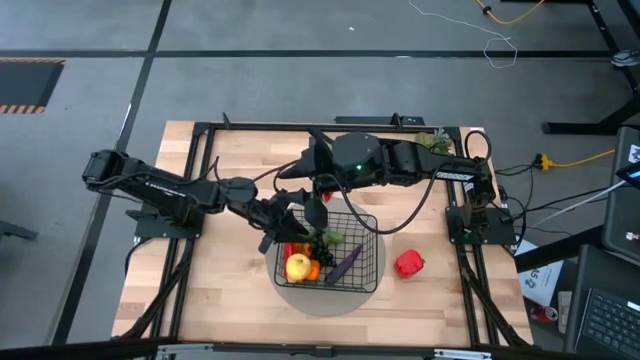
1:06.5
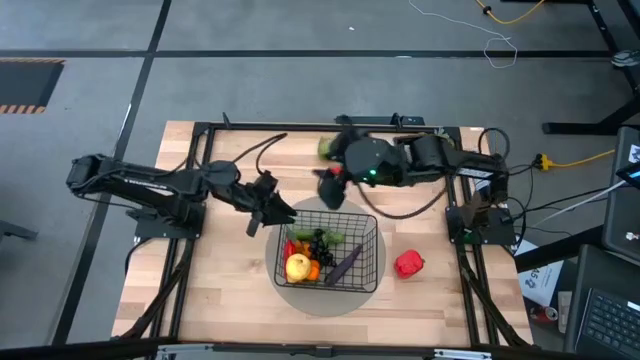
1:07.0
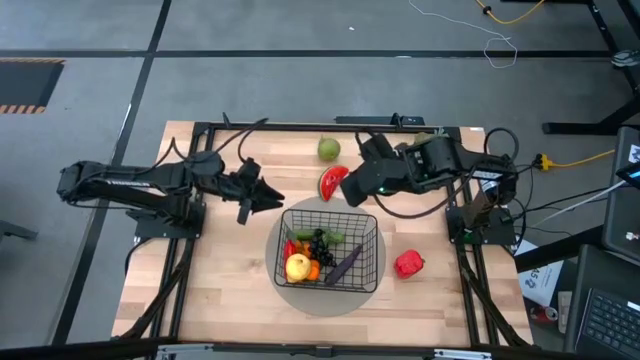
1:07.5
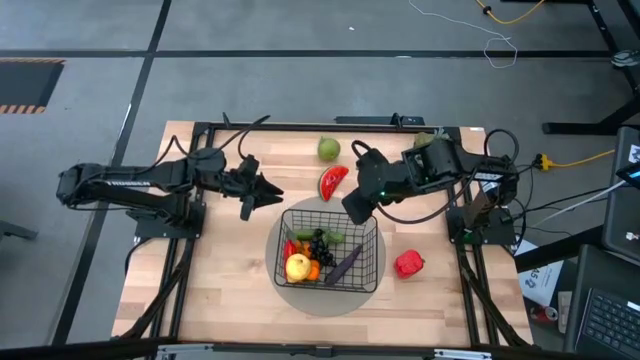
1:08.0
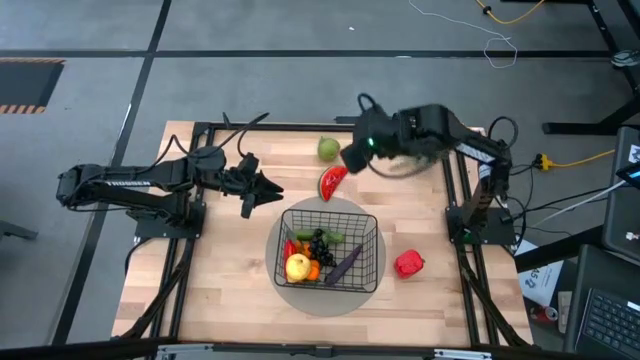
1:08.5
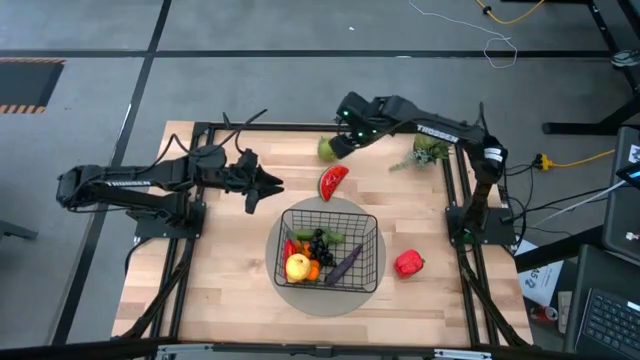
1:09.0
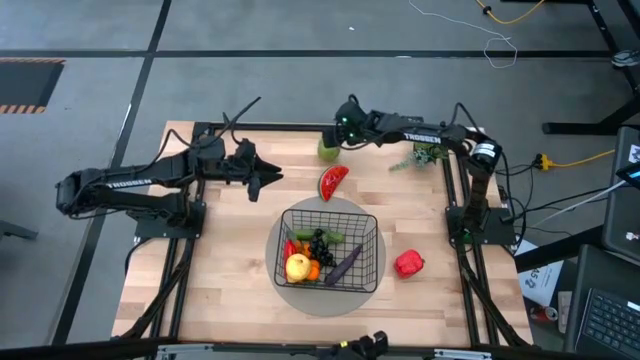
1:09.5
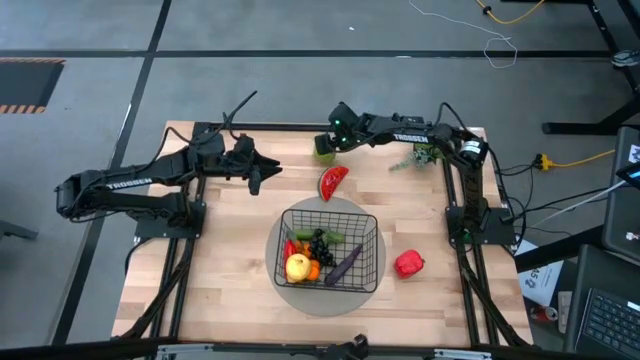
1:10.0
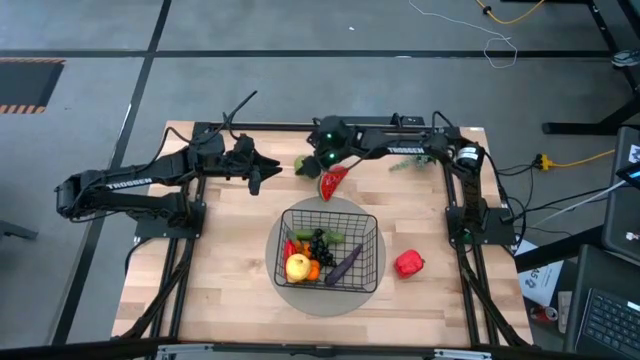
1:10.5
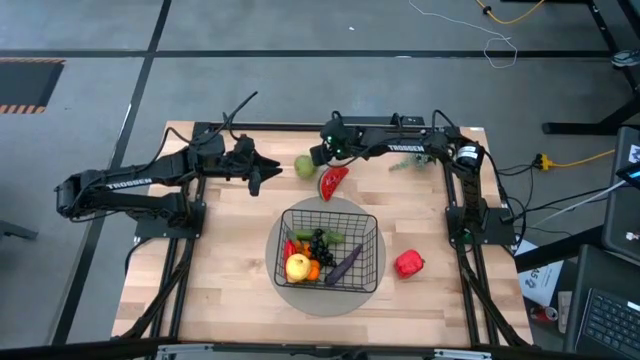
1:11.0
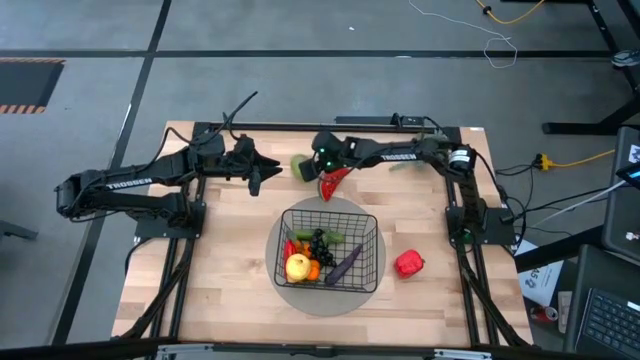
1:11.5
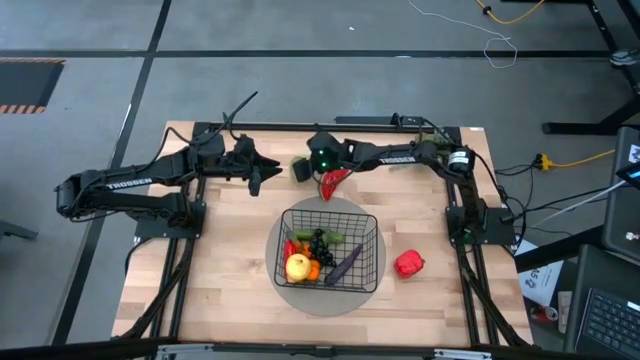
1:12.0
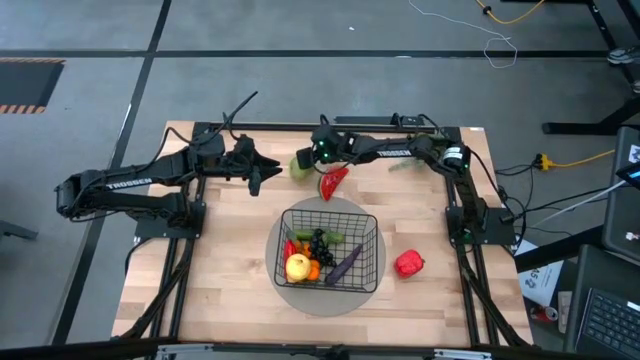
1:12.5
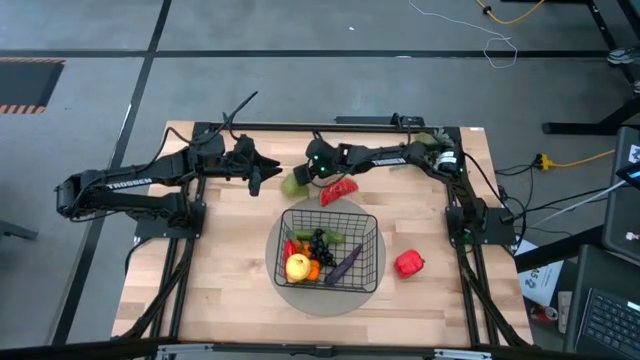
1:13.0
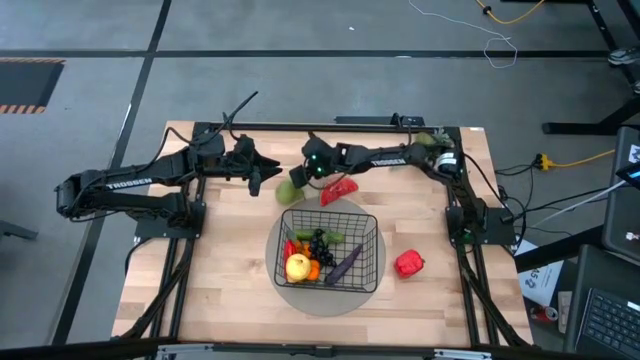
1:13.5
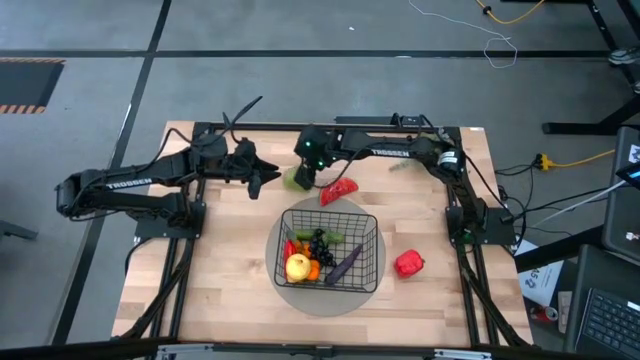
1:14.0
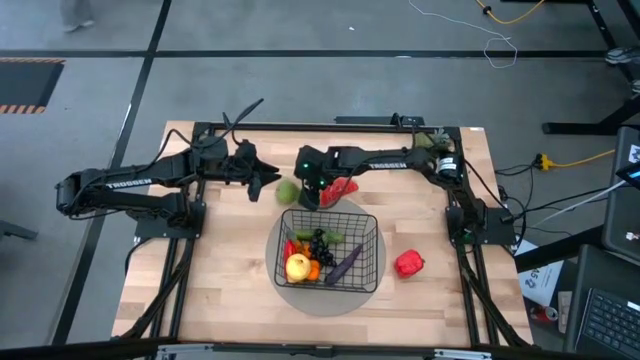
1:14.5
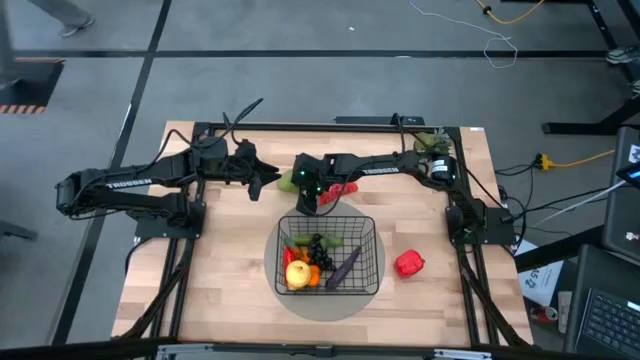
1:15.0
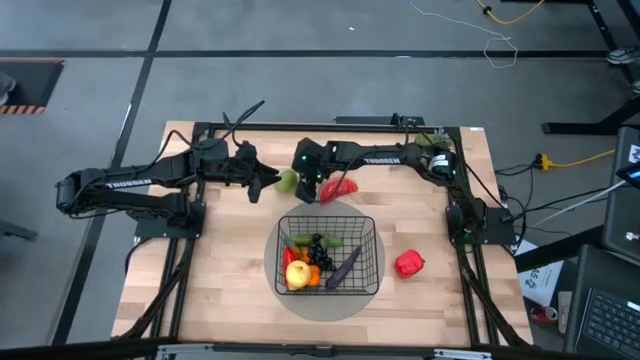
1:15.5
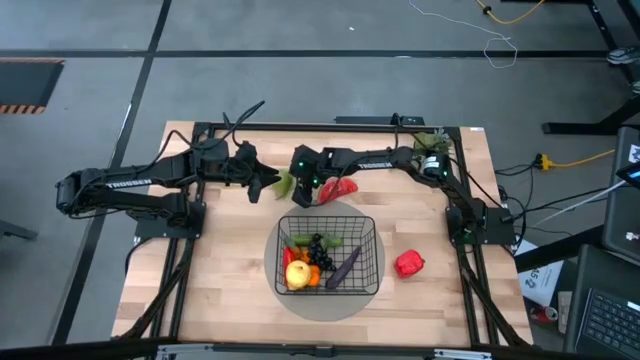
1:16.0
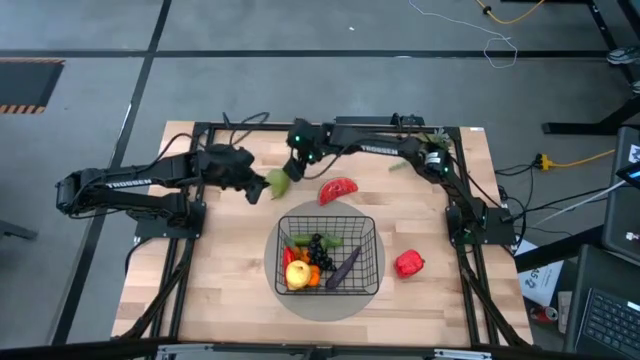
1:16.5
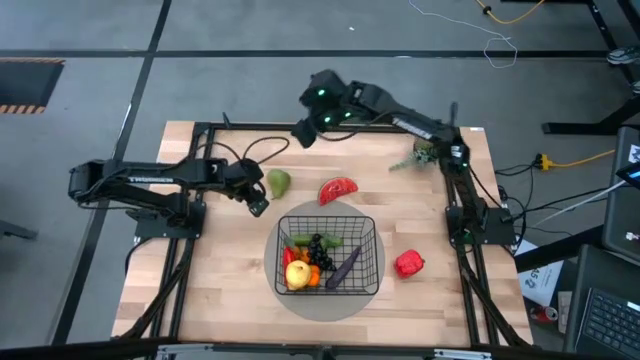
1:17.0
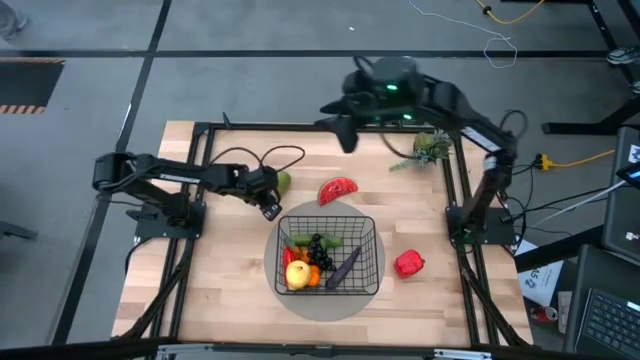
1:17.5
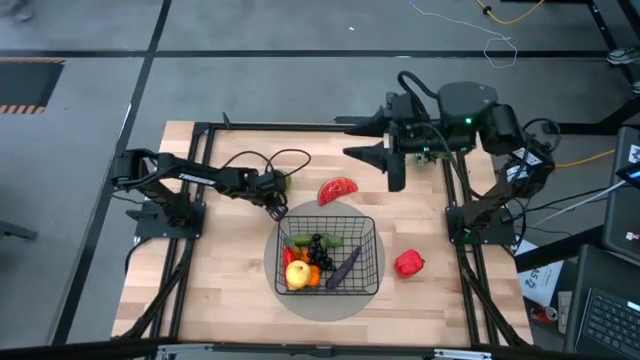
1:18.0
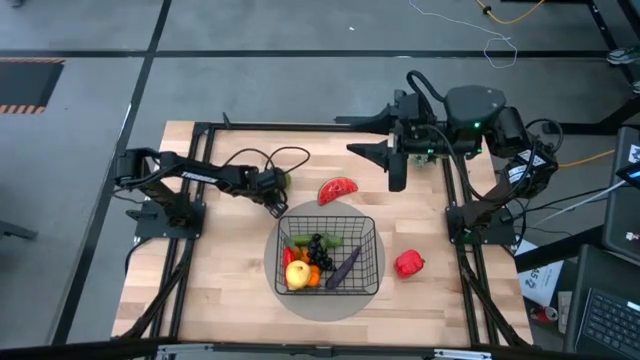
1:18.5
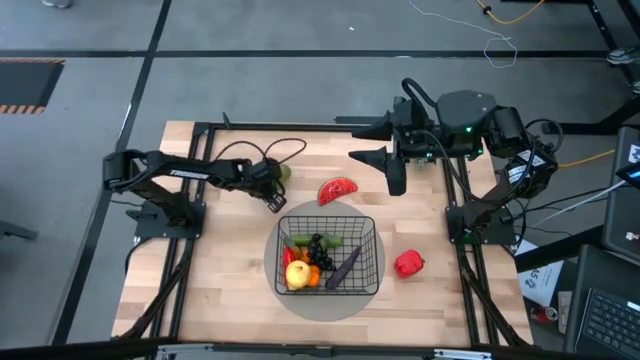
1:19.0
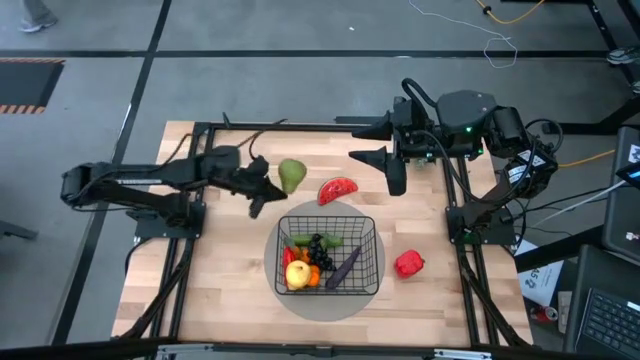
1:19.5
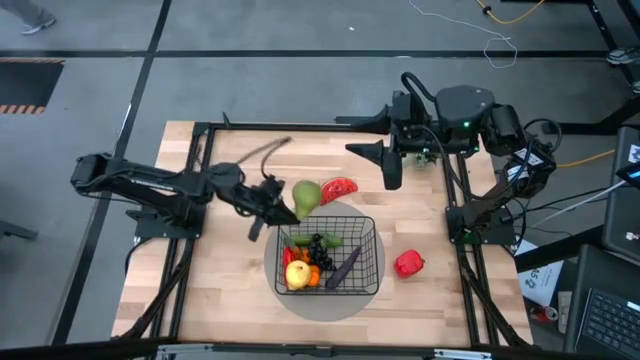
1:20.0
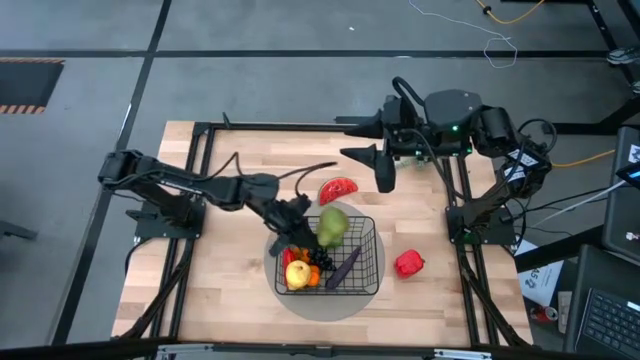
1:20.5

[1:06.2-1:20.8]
Task: Build produce basket
Put the green pear into black wire basket

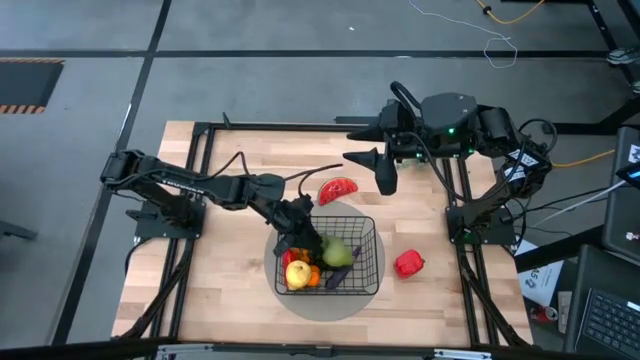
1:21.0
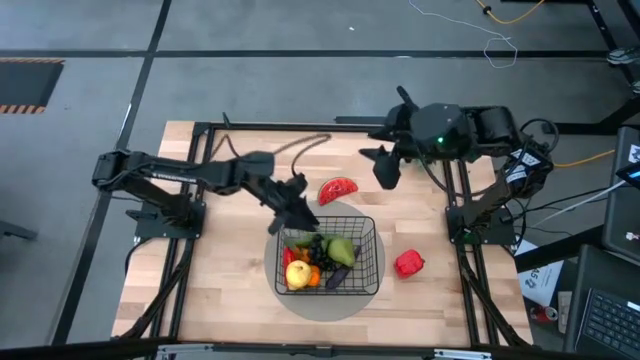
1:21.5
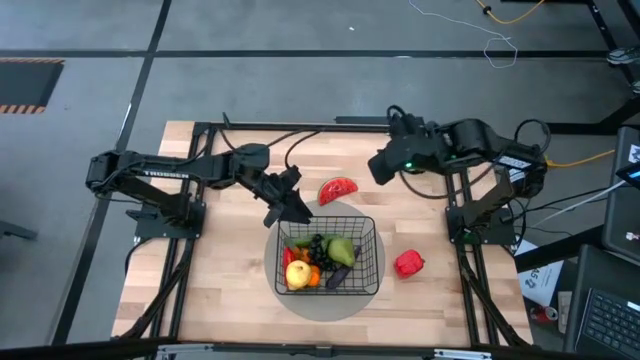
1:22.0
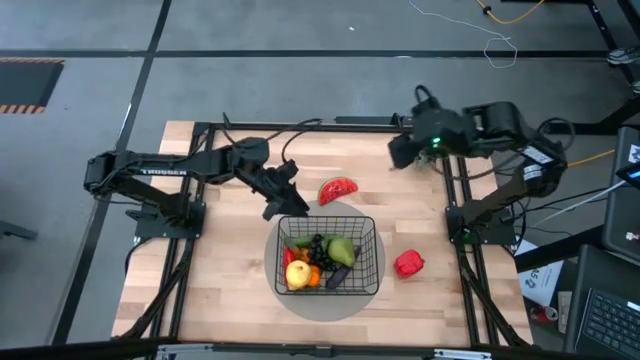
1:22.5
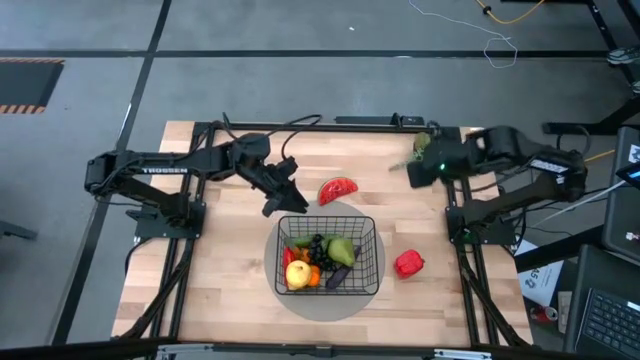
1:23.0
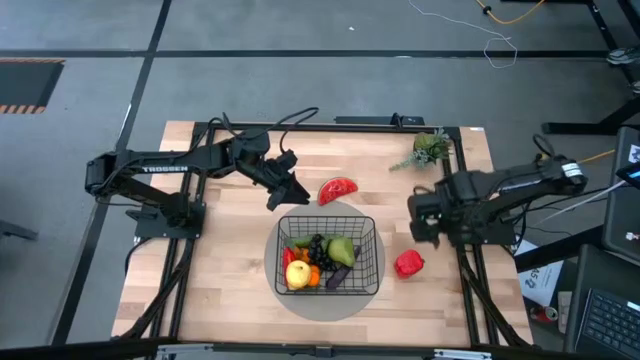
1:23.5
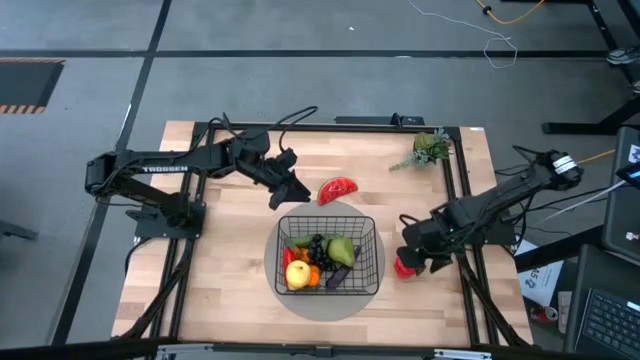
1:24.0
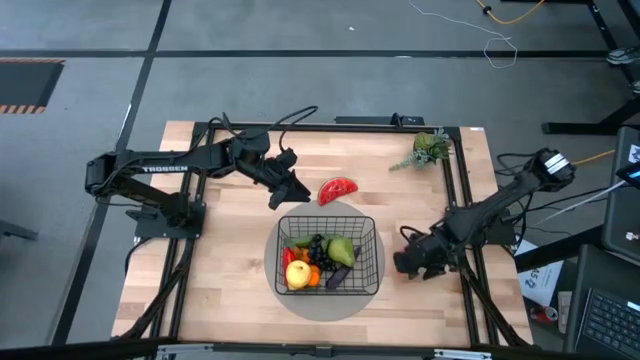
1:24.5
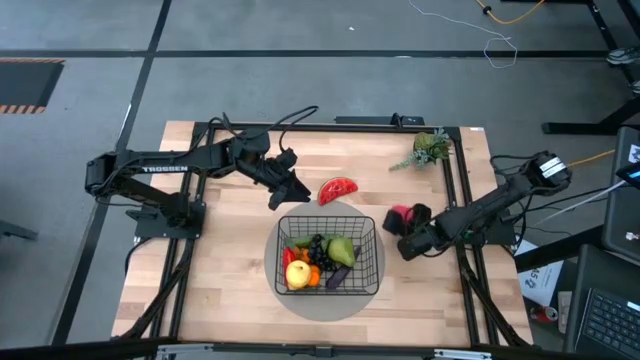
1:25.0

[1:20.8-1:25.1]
Move the red bell pepper to the top right of the table

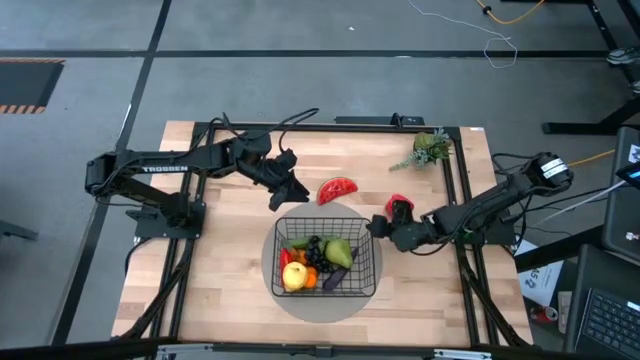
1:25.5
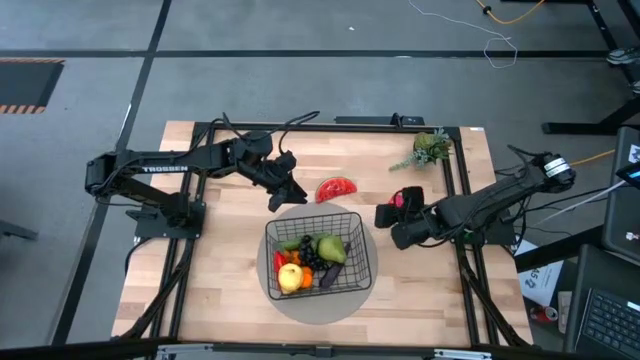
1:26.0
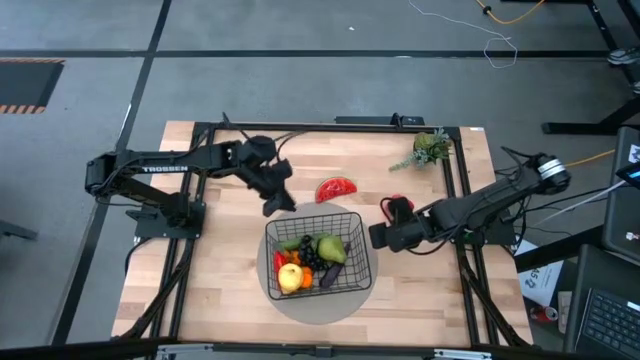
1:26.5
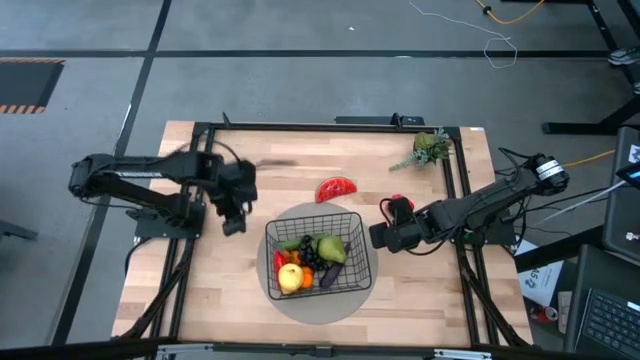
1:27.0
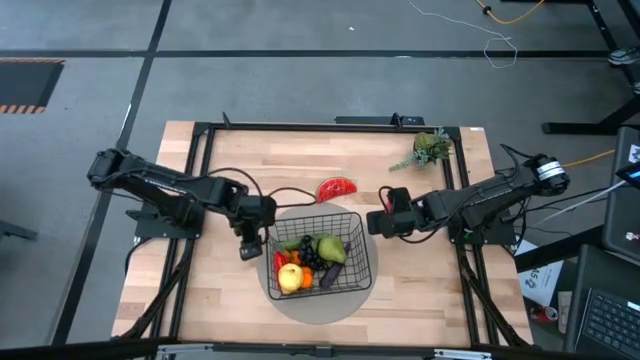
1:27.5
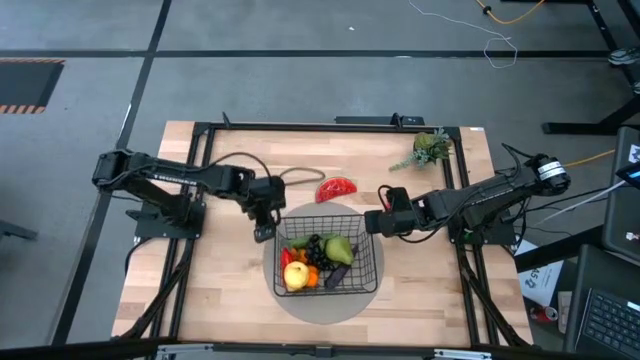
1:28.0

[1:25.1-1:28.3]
Adjust the black wire basket
